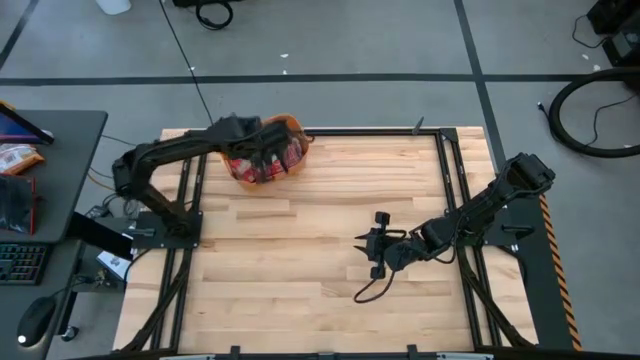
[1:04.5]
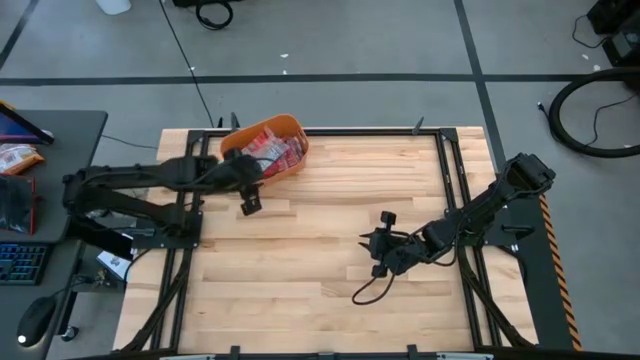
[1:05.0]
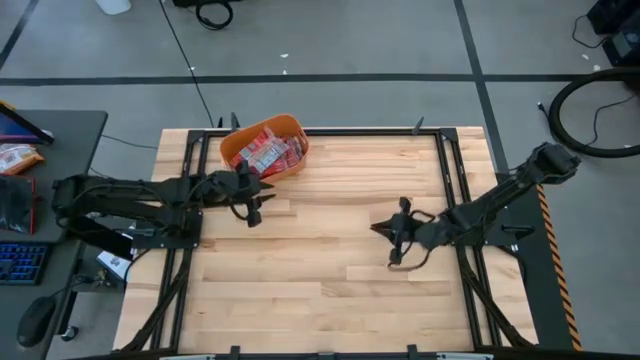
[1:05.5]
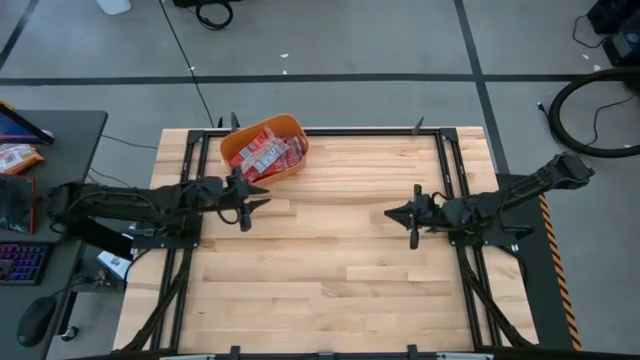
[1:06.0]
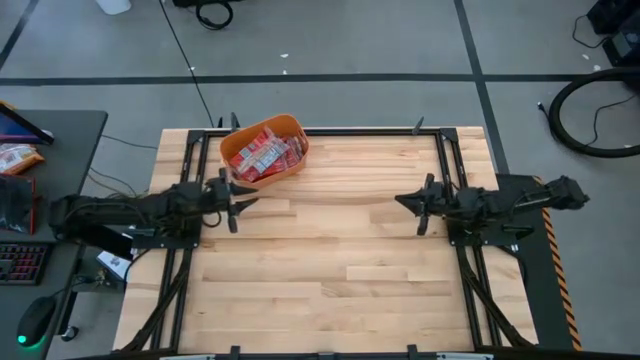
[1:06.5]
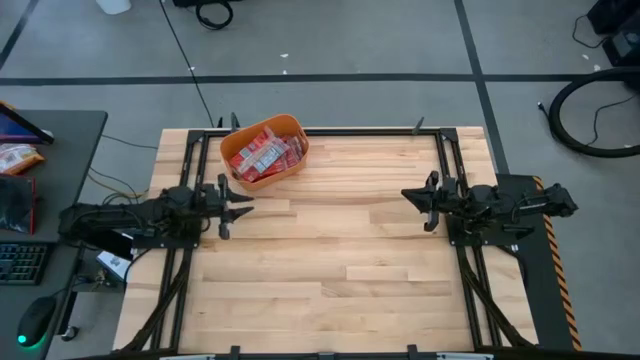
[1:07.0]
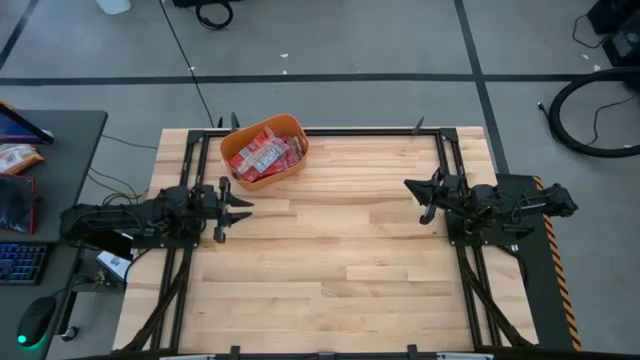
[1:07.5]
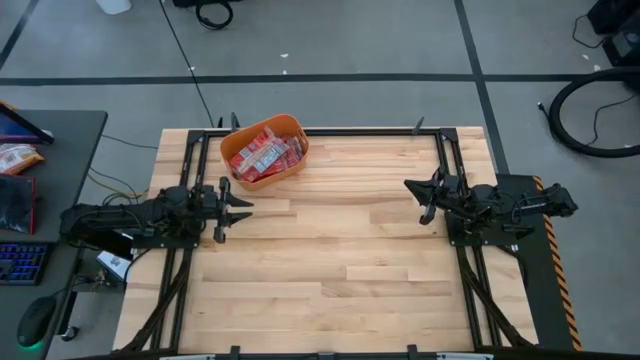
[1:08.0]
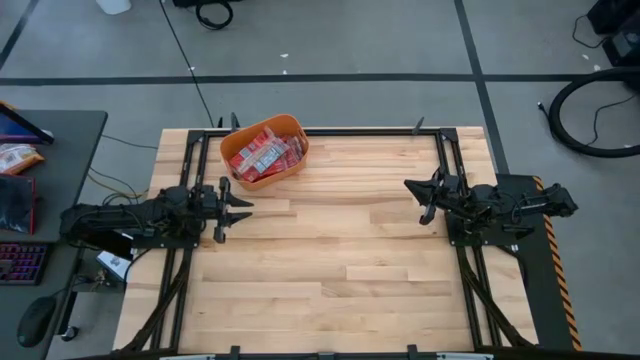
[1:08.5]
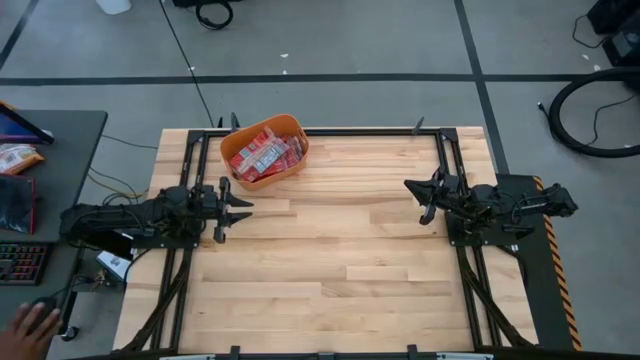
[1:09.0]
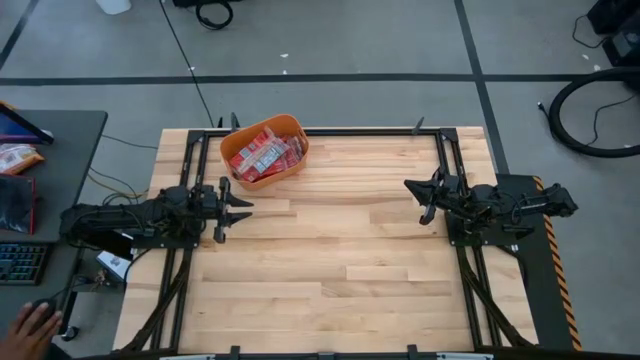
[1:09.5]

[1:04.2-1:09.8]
Task: Sort popcorn bags into baskets
Return to Home Position

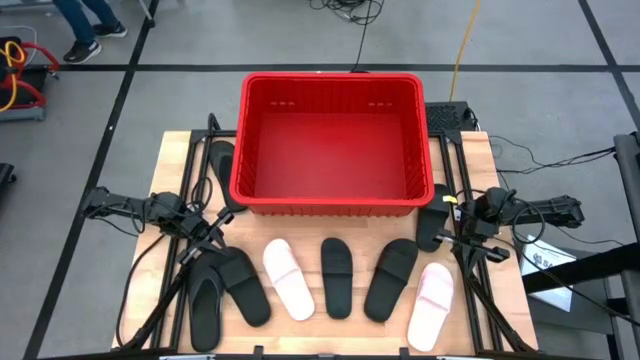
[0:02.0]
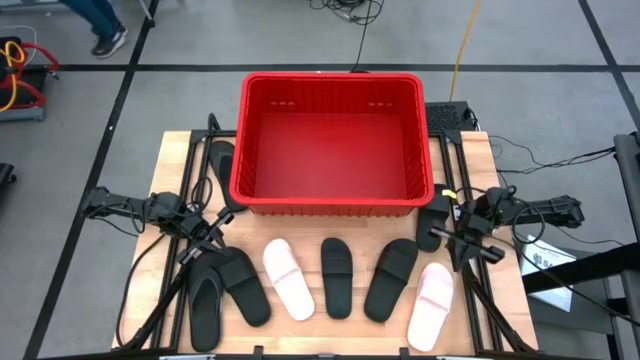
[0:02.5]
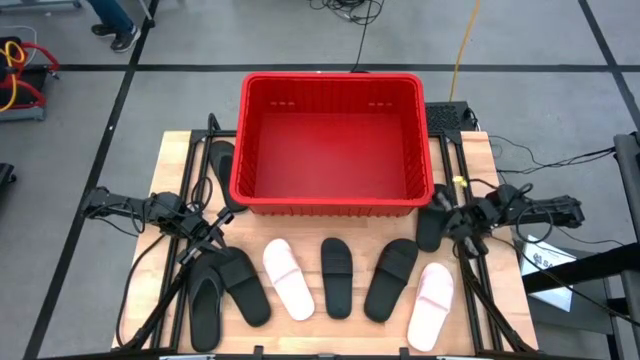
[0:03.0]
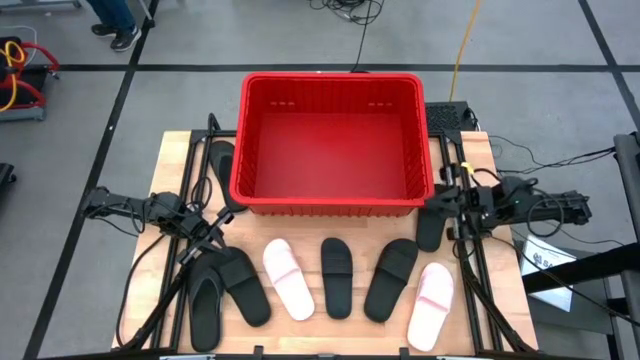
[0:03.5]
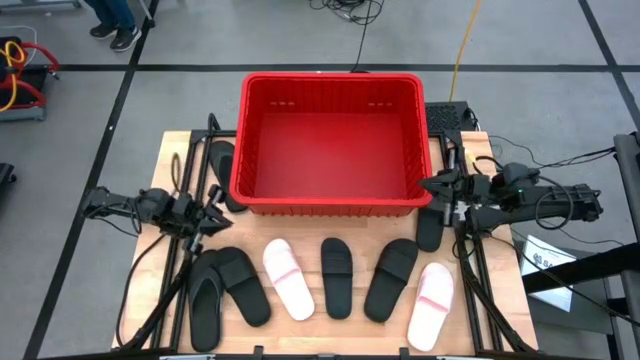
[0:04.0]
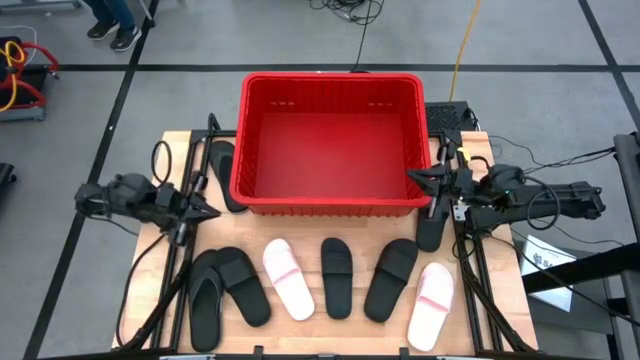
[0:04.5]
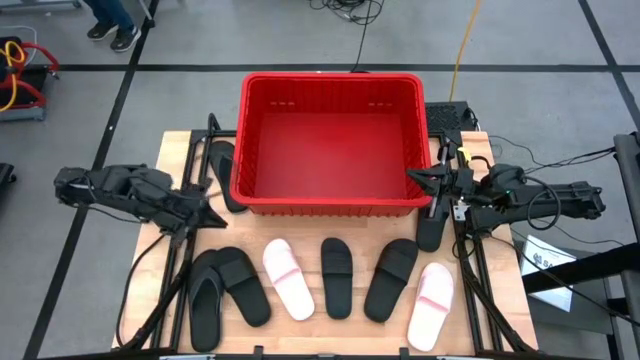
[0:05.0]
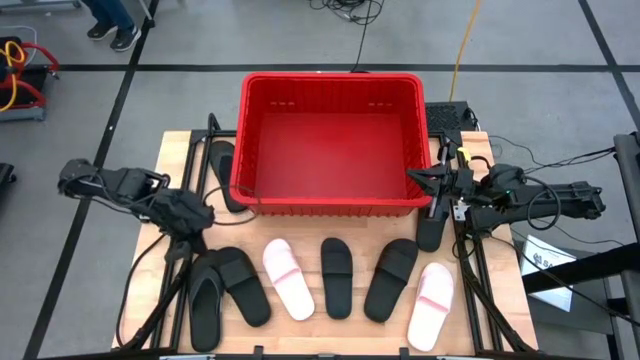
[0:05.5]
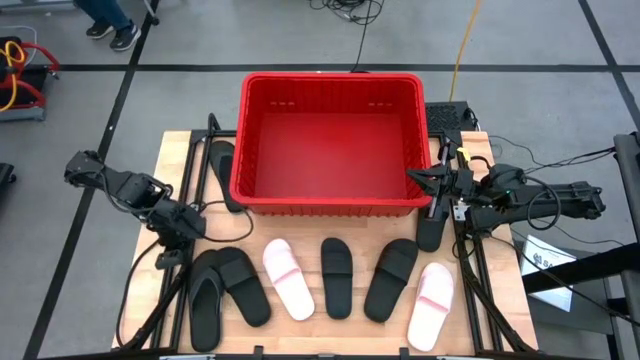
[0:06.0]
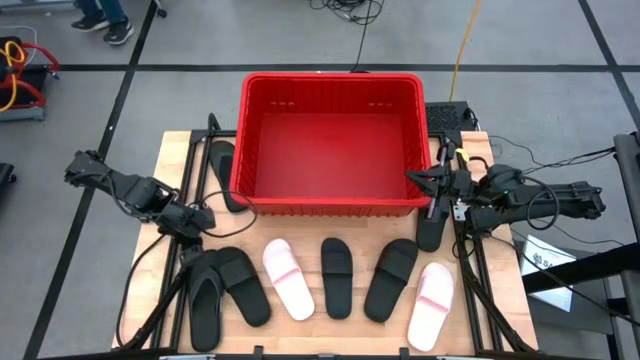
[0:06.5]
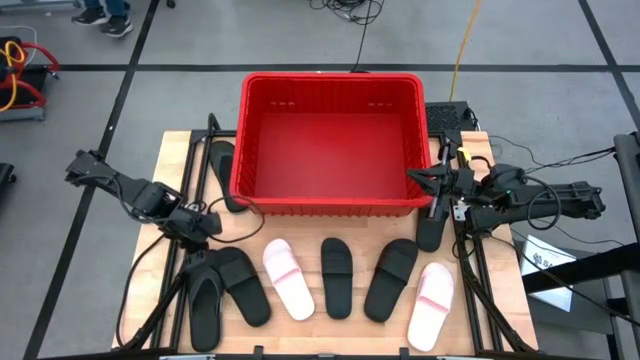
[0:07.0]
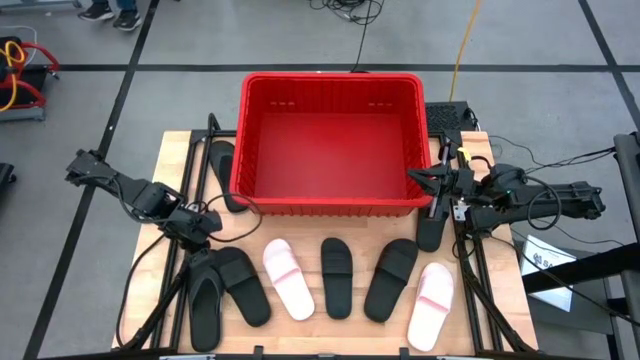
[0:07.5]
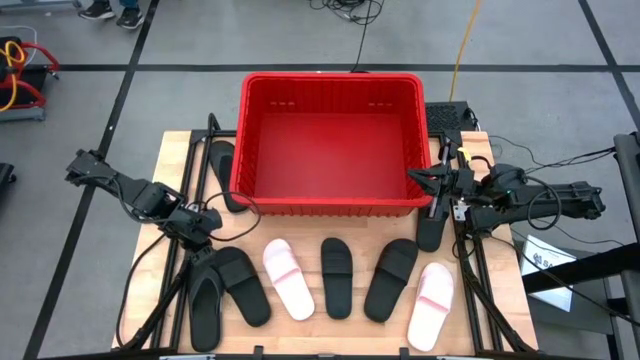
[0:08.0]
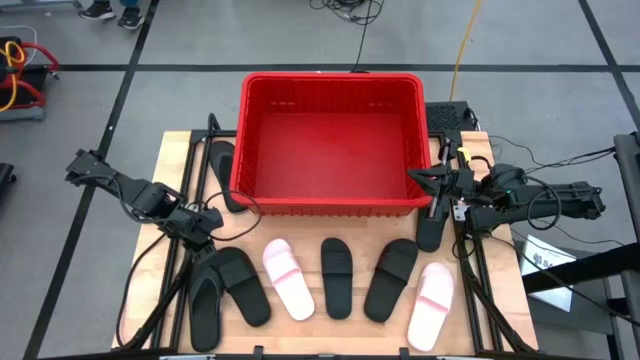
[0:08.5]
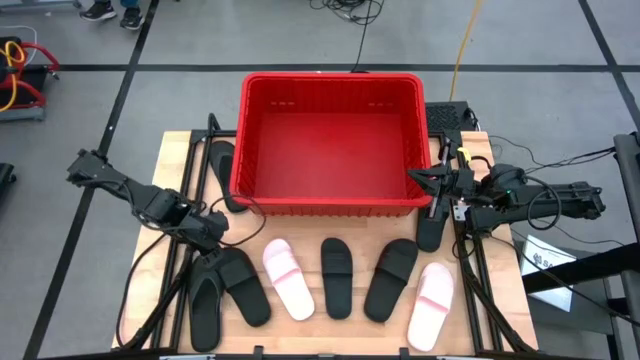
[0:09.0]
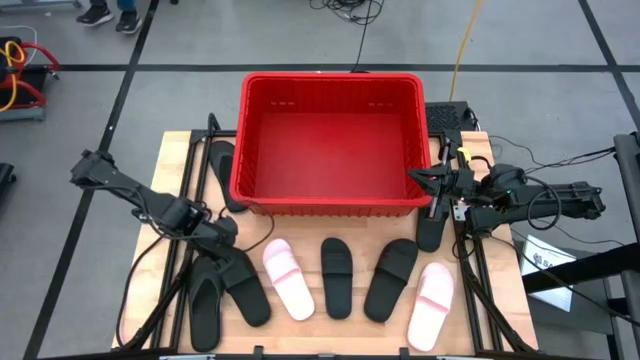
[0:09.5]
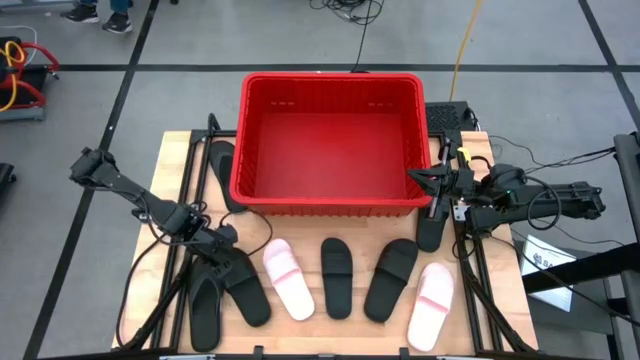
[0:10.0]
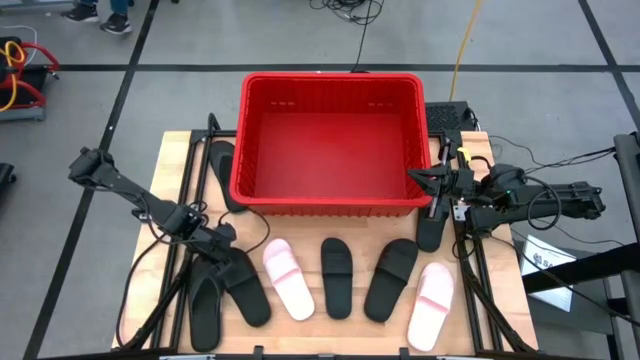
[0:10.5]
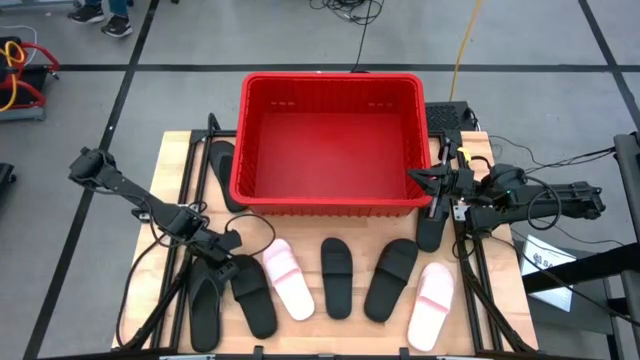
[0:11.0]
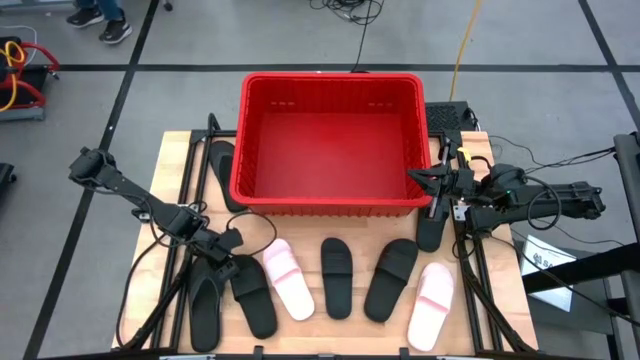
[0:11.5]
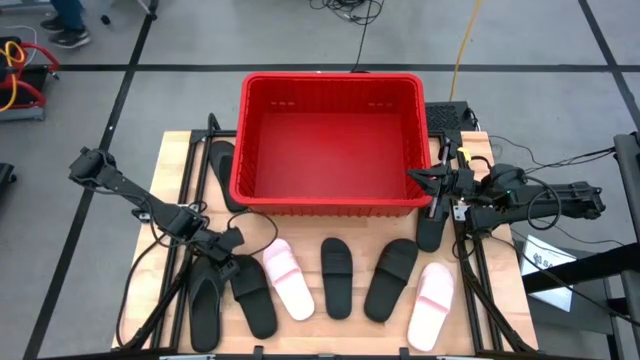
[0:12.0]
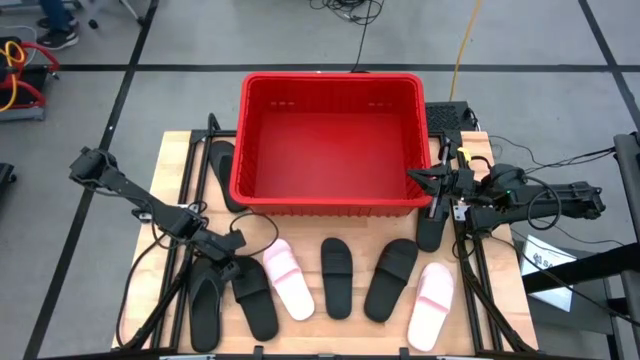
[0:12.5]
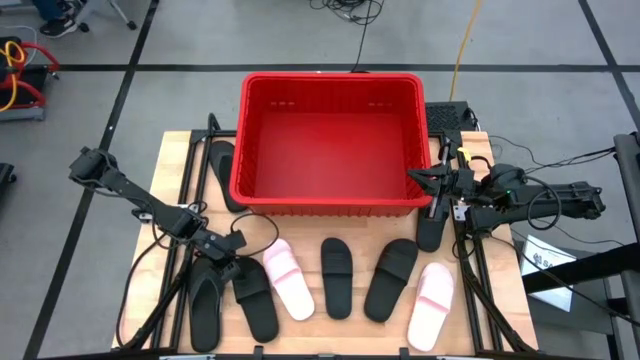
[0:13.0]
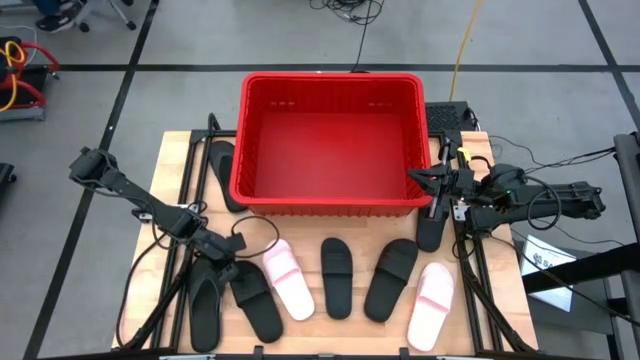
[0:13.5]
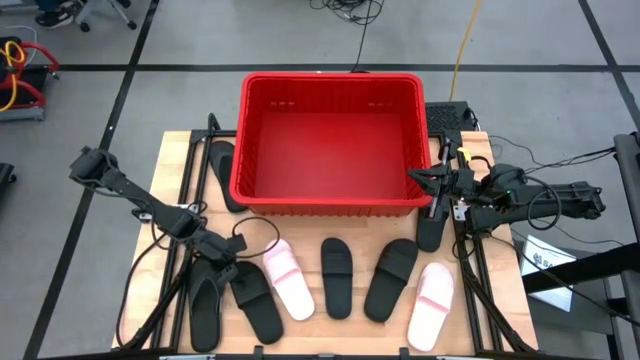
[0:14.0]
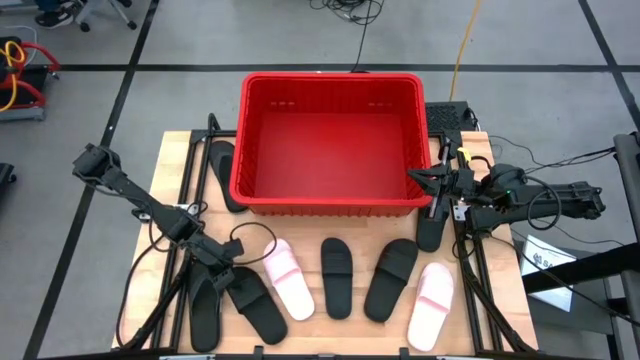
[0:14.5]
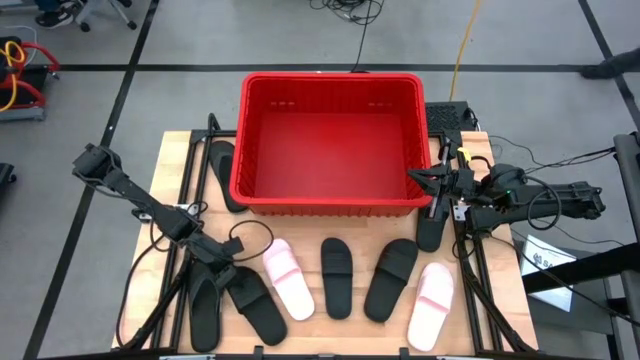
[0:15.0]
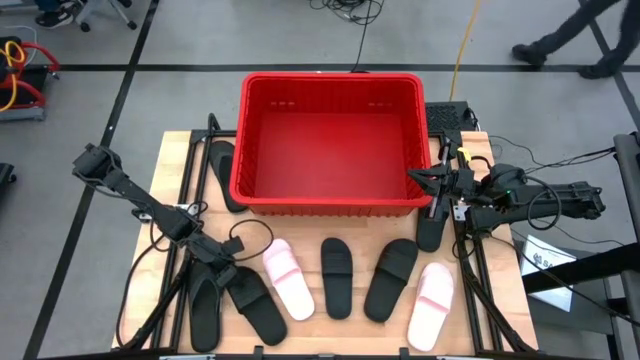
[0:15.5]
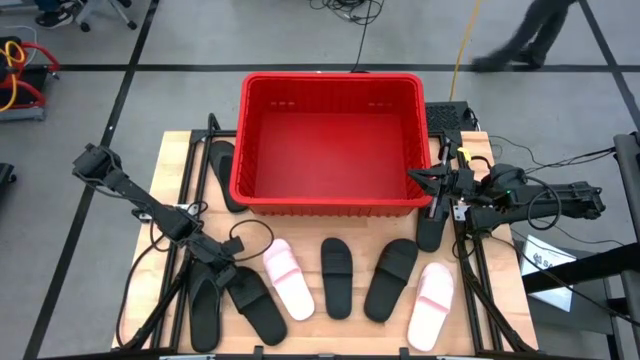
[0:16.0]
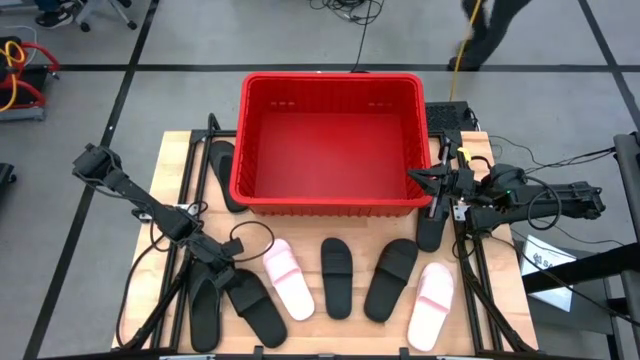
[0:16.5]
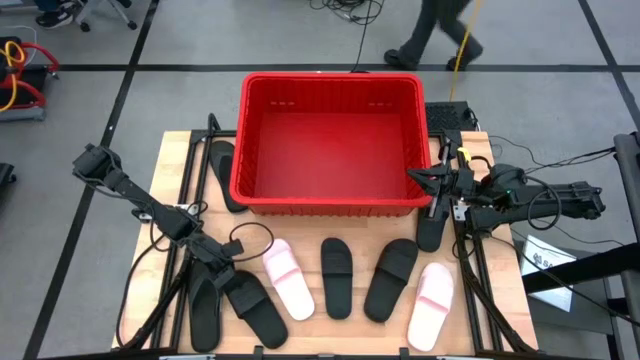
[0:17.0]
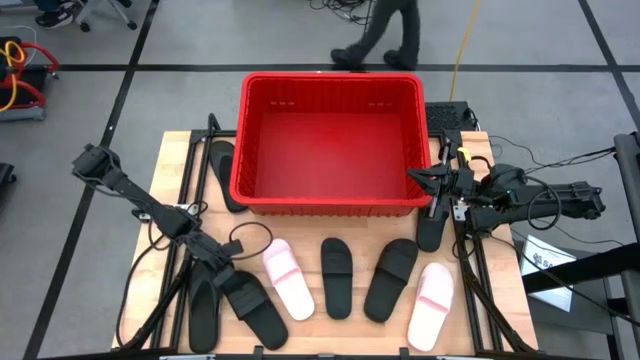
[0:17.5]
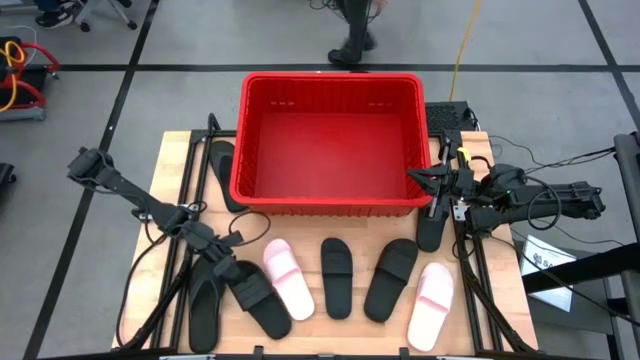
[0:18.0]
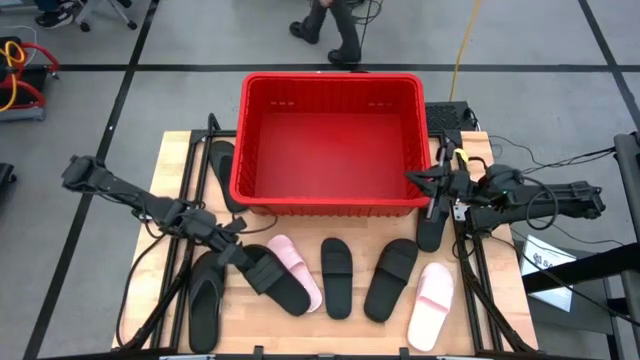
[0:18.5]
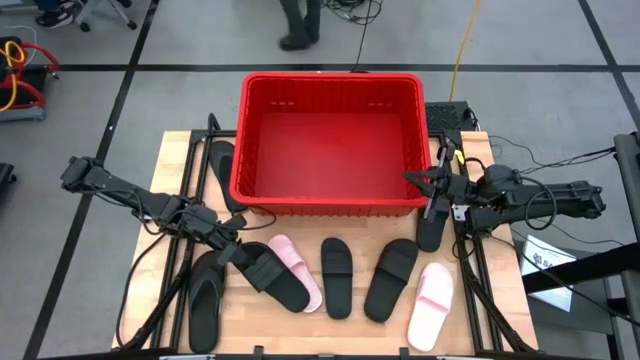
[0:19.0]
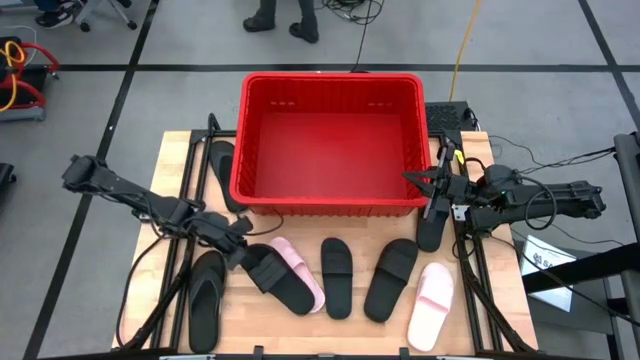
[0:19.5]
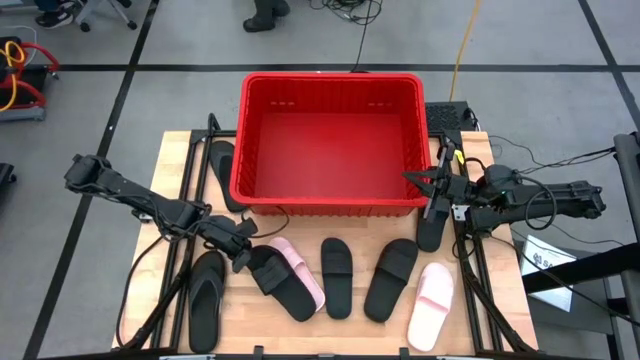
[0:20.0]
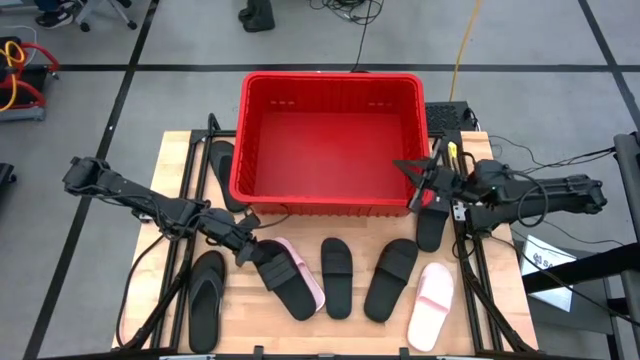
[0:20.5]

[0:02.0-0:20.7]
Task: Pick and place slides into bin
Put the black slide into the red bin
